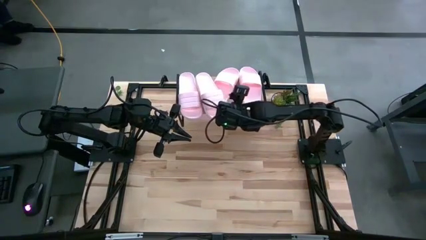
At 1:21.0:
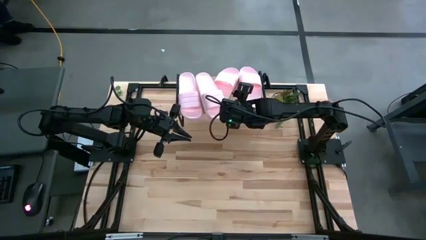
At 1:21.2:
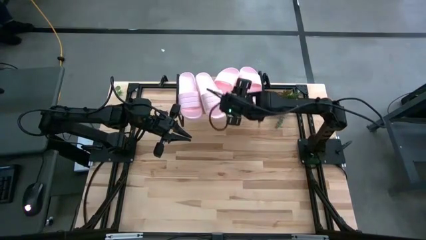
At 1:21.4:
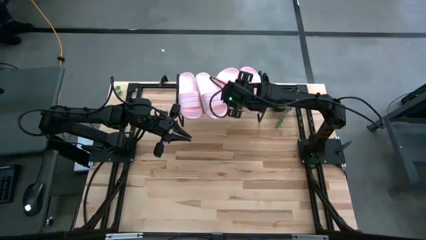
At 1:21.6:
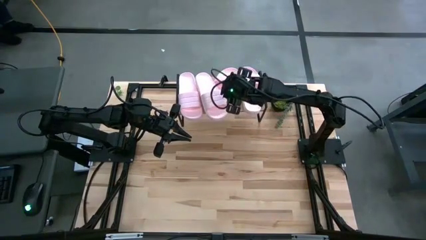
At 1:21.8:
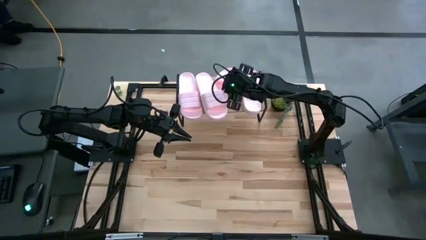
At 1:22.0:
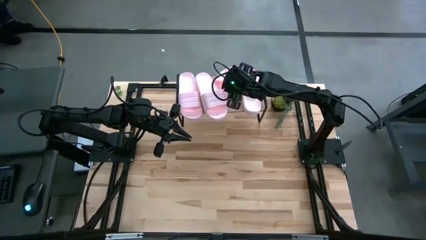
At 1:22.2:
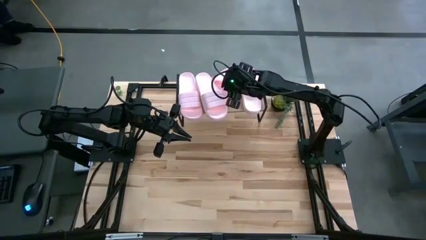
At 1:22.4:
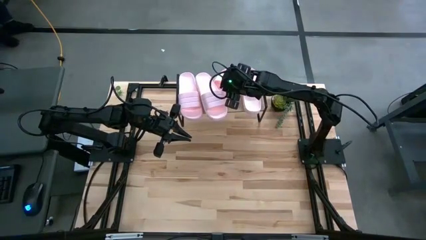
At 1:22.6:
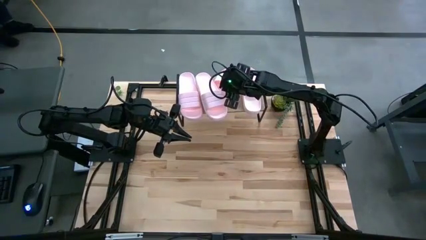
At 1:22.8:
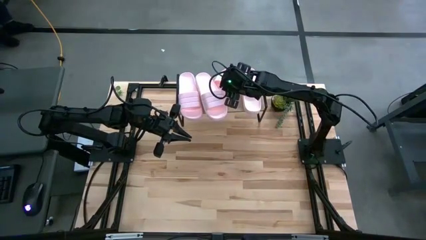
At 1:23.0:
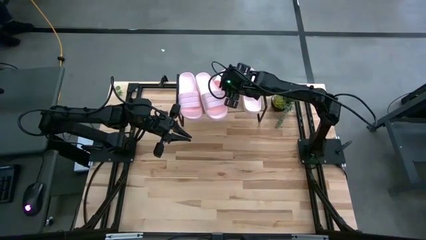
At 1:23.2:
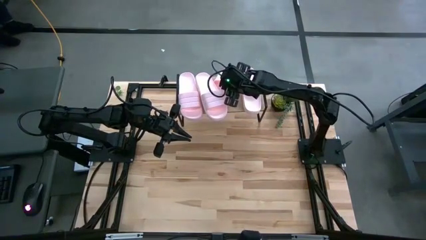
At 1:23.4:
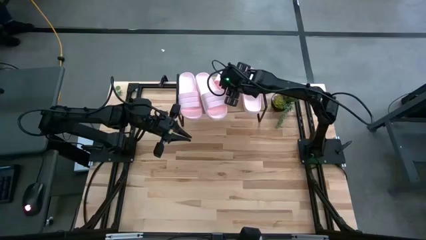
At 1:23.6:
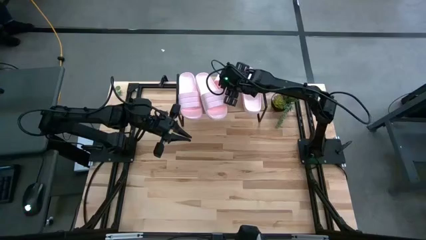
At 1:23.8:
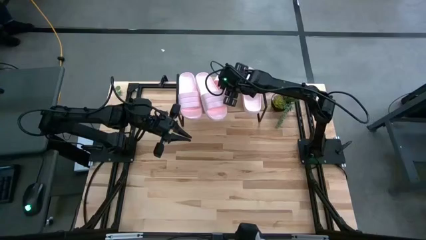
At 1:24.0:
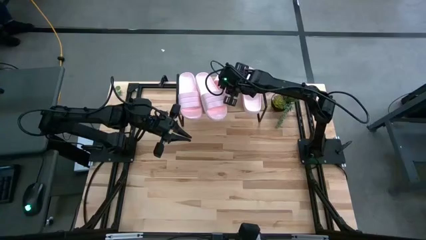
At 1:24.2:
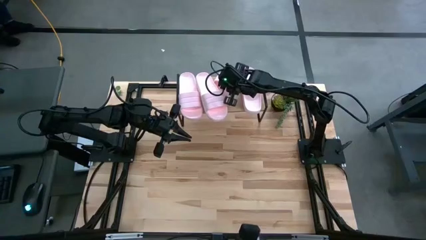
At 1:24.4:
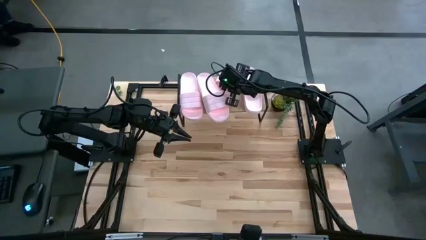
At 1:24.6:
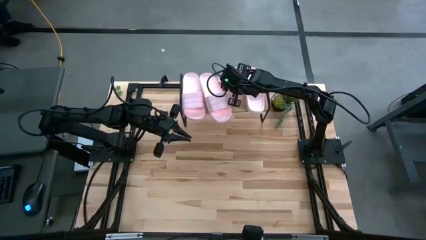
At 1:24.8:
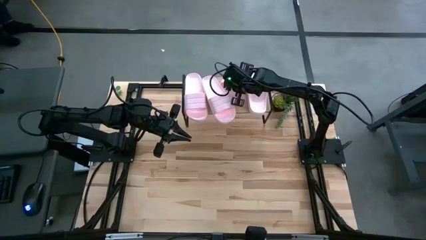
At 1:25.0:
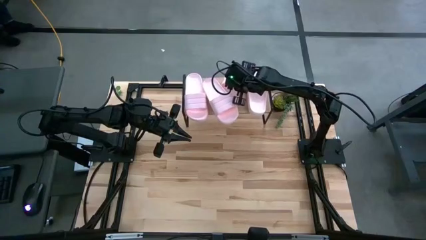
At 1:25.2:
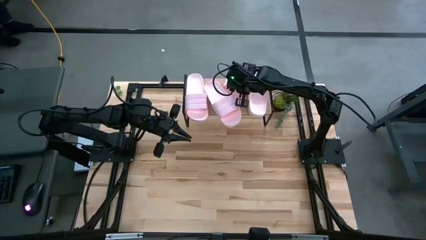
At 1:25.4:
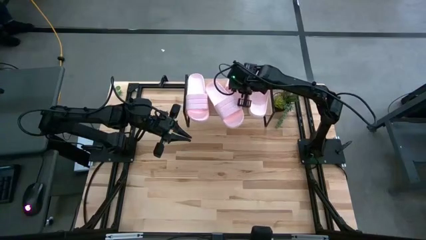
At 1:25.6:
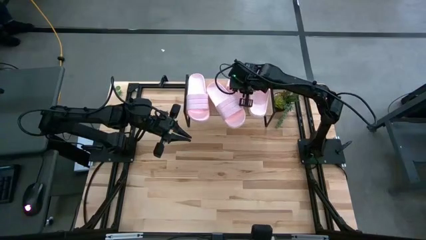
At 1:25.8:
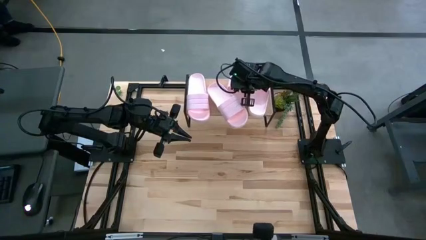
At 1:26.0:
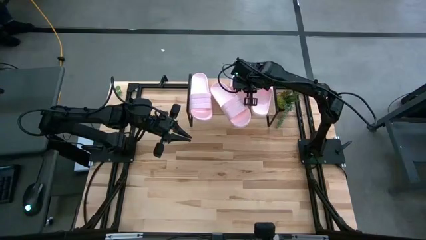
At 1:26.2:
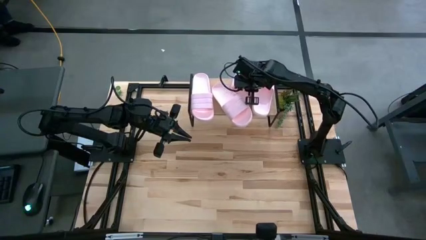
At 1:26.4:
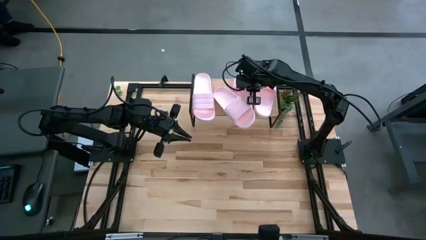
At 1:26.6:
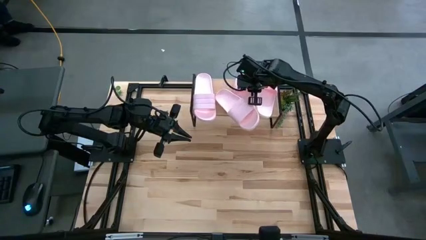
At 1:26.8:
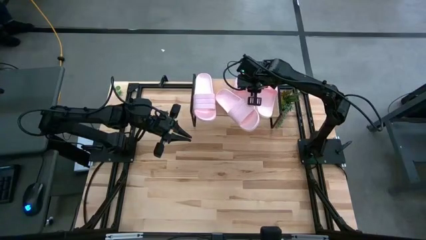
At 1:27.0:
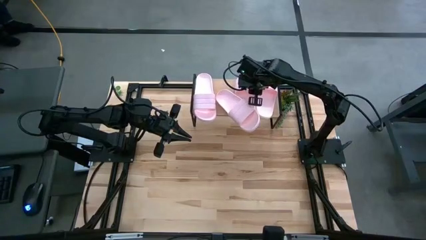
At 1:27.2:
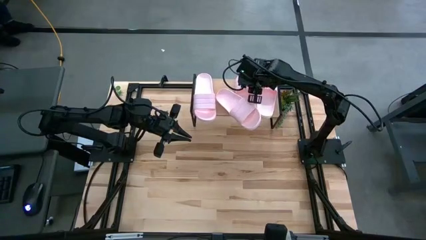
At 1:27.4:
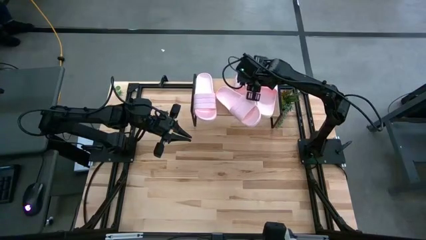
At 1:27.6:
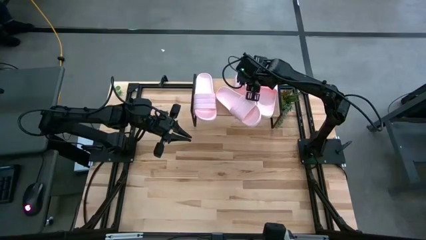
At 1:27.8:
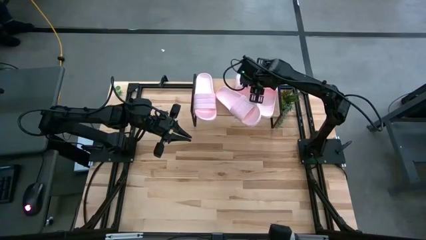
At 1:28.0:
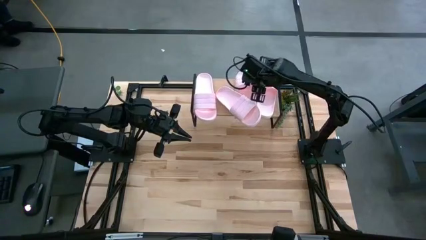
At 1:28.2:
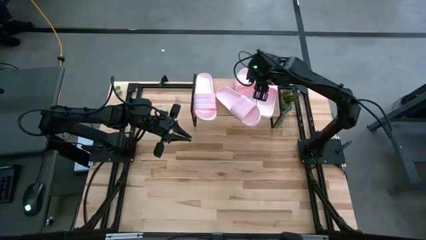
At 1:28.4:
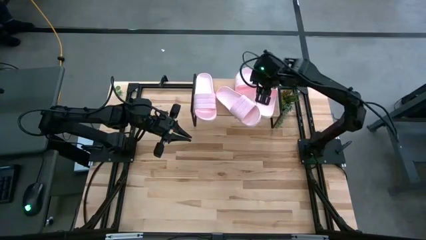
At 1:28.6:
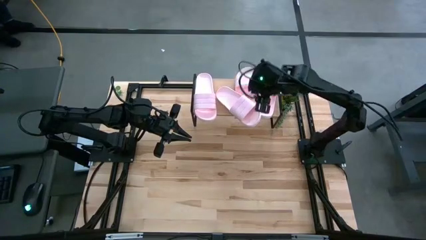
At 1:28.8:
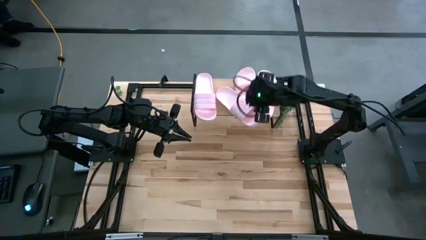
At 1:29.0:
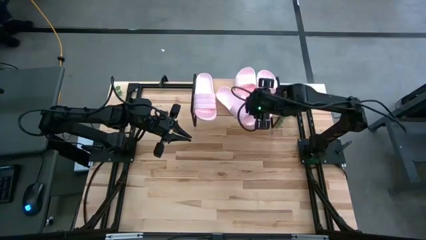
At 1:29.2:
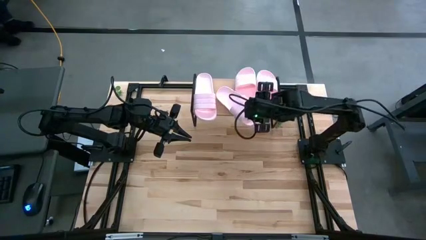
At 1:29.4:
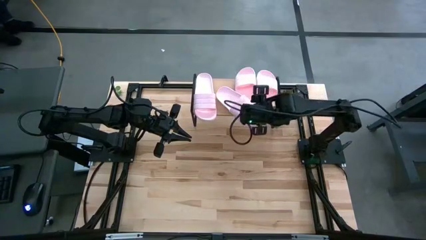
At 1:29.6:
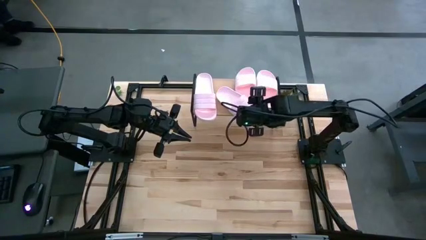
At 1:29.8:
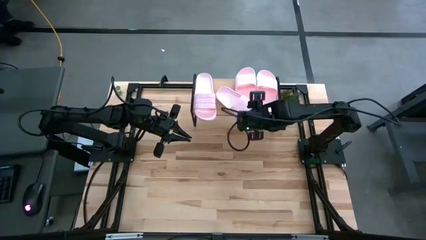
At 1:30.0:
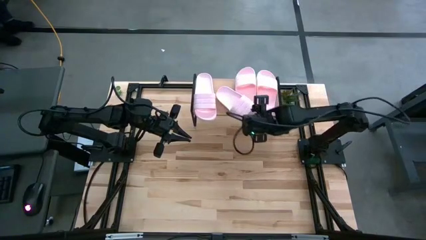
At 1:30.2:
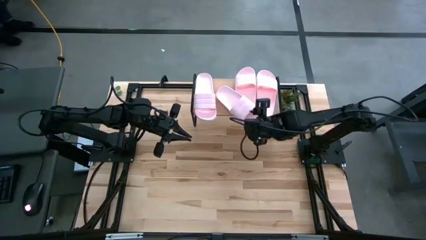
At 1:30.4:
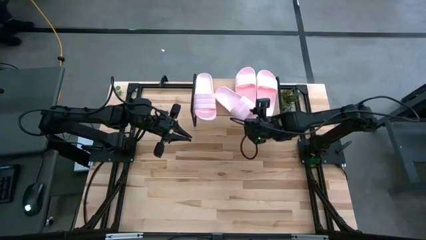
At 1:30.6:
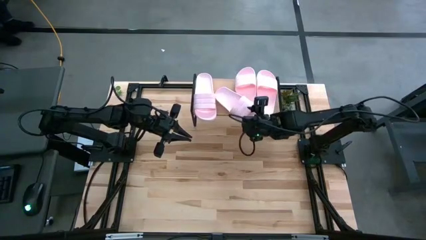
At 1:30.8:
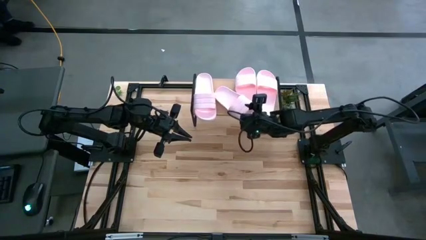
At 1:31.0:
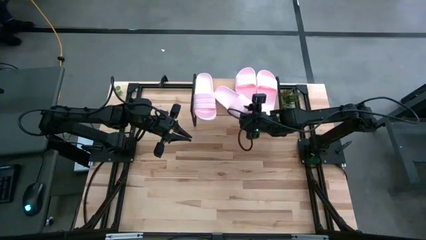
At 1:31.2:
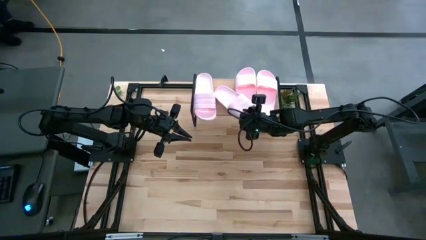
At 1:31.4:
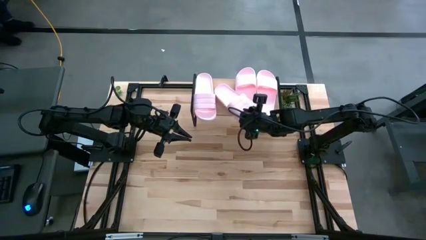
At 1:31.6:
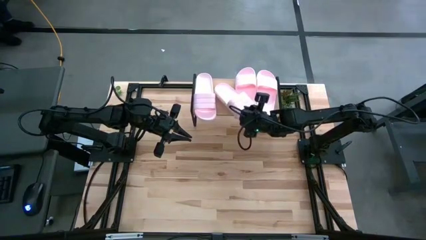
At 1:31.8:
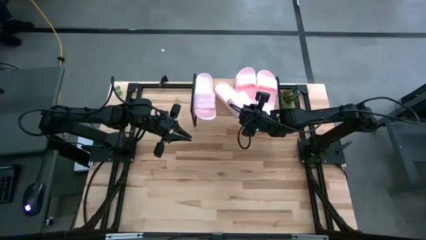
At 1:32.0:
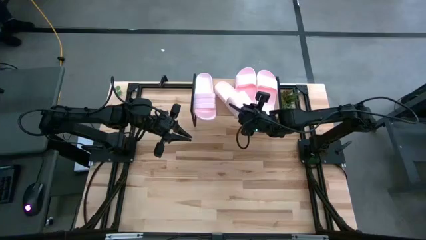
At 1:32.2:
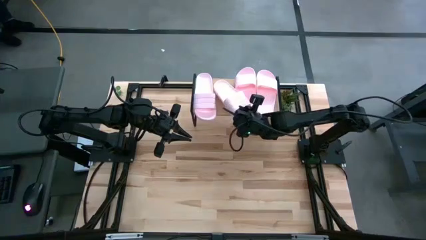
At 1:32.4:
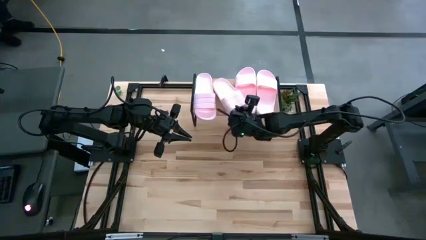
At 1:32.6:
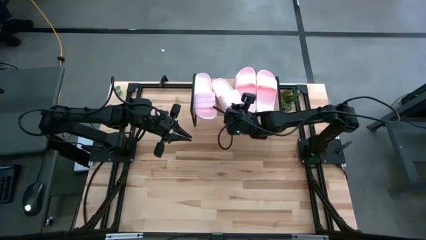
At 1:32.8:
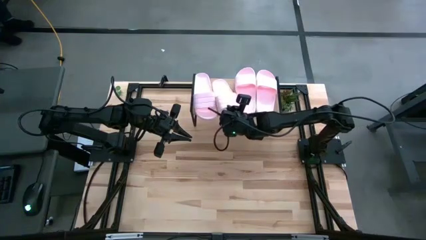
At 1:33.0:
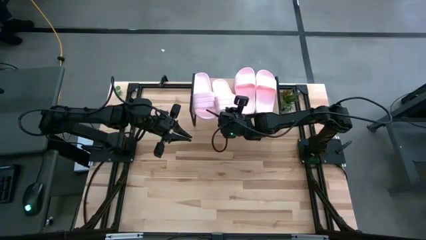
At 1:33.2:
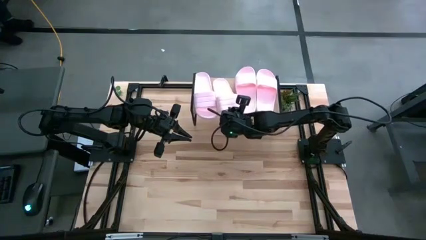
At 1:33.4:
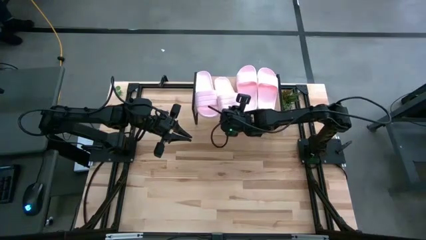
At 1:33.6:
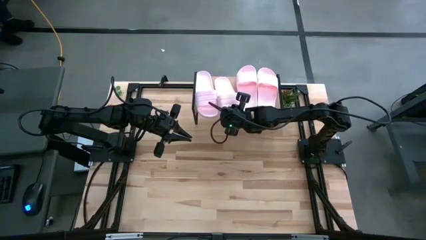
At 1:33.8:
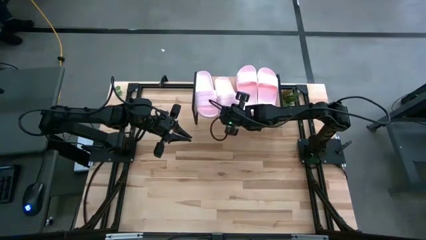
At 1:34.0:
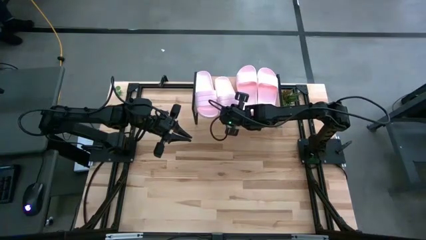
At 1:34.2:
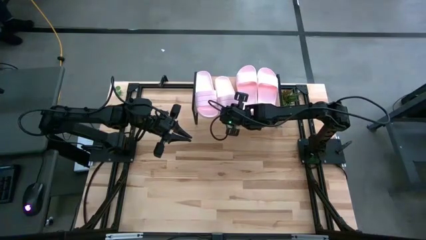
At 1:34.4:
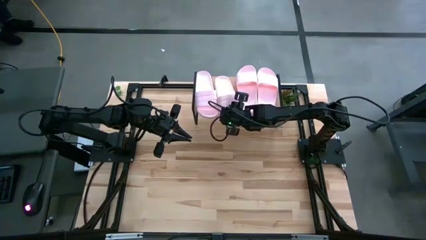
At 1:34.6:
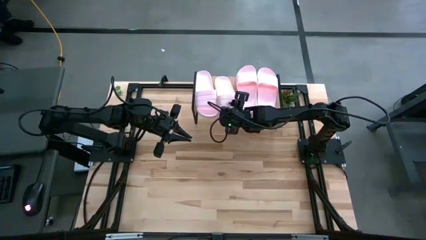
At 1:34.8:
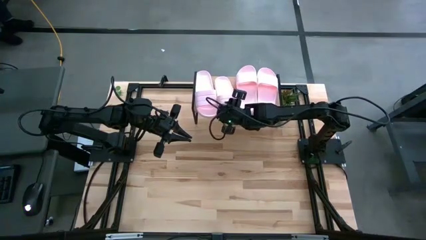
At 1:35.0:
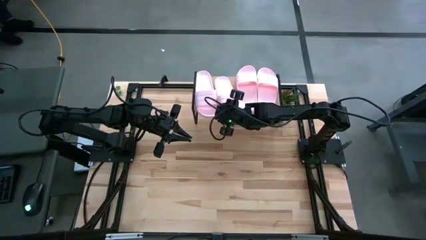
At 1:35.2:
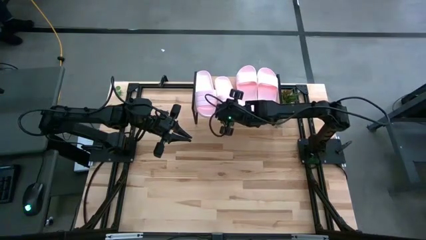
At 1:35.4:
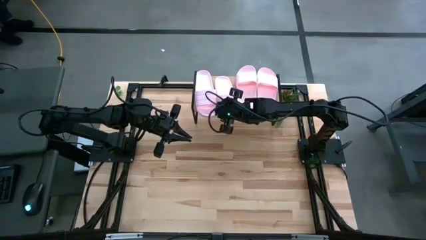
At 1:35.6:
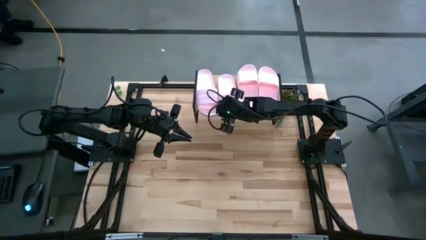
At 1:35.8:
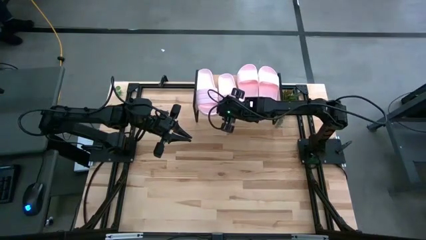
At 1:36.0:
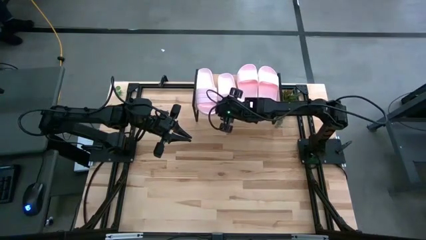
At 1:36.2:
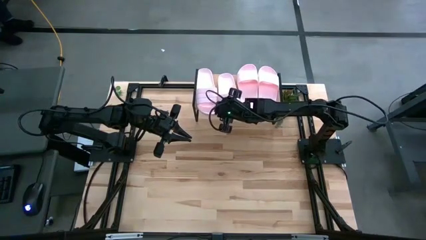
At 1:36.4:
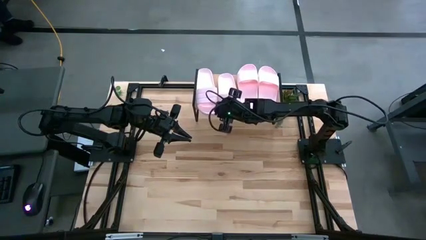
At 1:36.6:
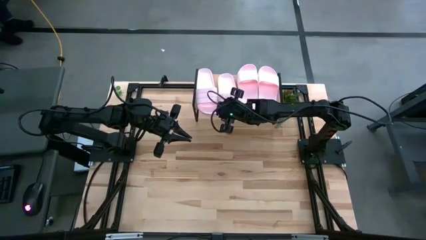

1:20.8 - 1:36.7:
Task: Pick and place slides into the shelf
Adjust the pink slippers on the shelf
